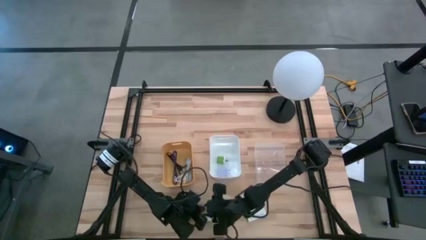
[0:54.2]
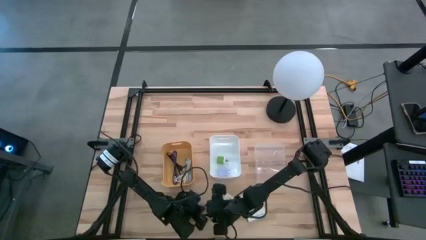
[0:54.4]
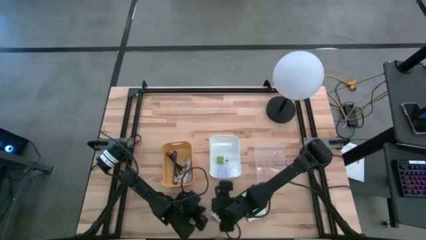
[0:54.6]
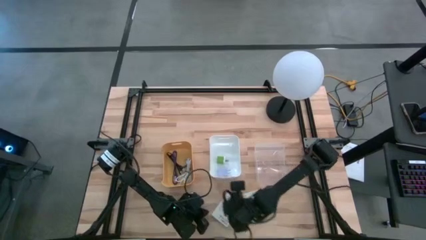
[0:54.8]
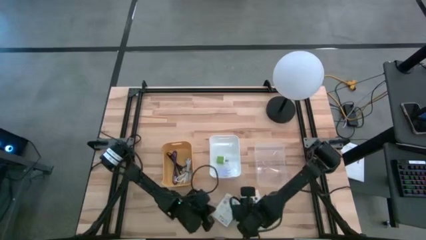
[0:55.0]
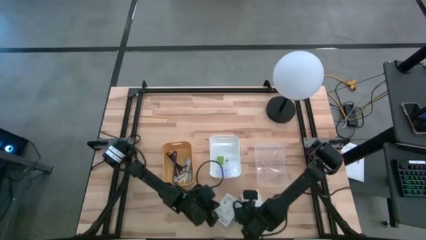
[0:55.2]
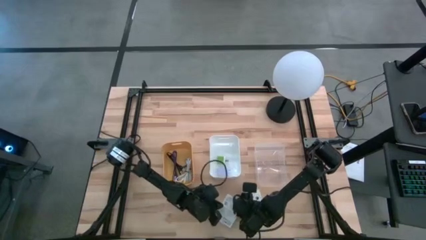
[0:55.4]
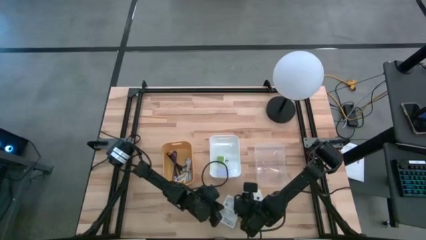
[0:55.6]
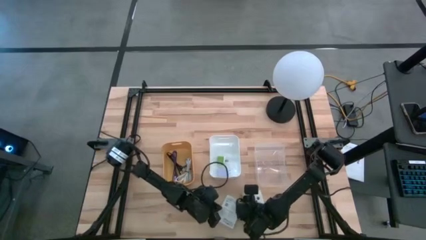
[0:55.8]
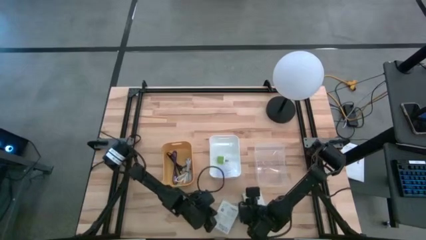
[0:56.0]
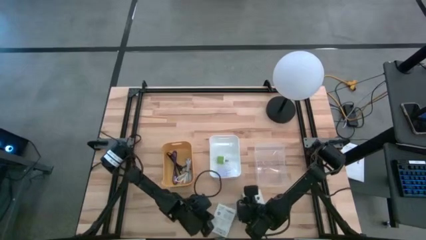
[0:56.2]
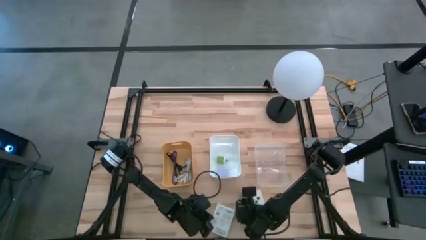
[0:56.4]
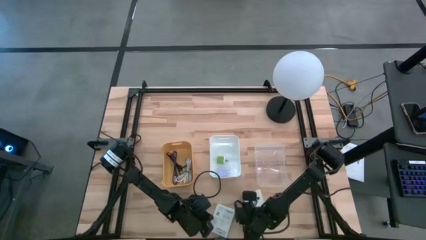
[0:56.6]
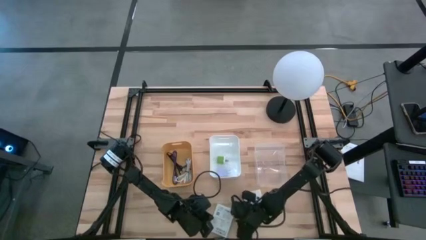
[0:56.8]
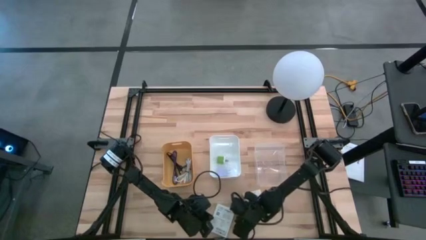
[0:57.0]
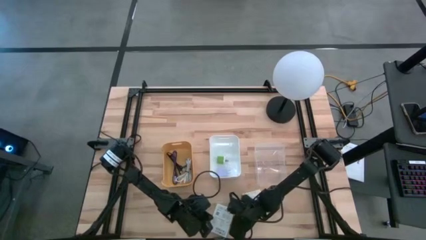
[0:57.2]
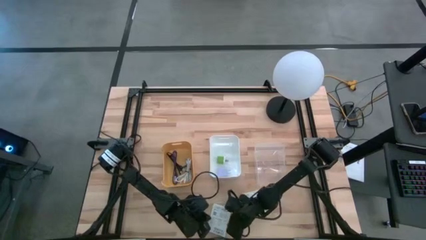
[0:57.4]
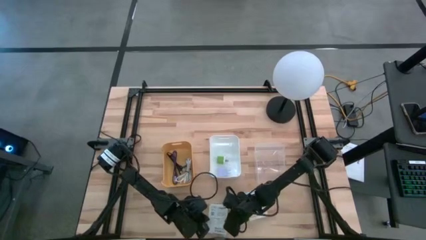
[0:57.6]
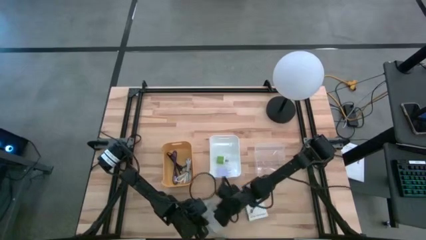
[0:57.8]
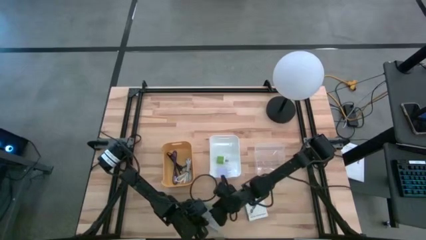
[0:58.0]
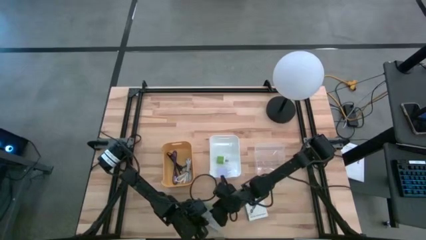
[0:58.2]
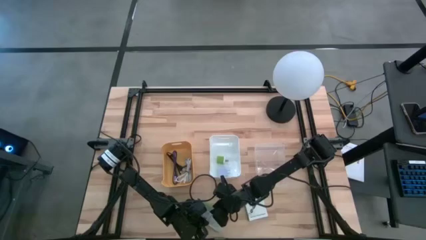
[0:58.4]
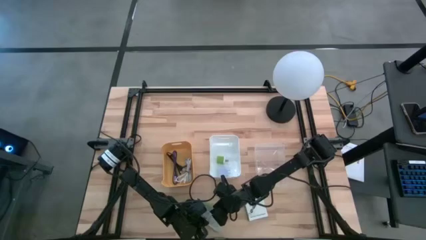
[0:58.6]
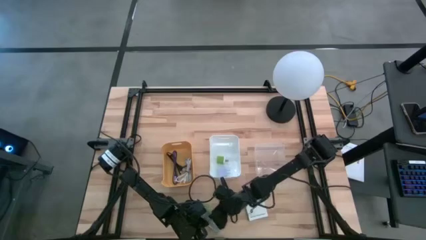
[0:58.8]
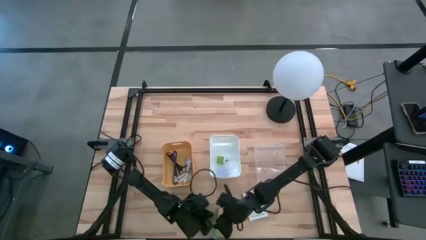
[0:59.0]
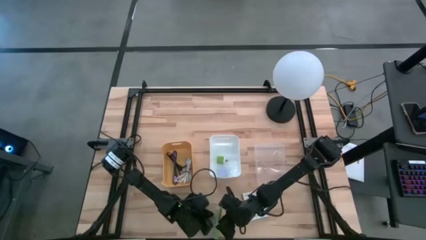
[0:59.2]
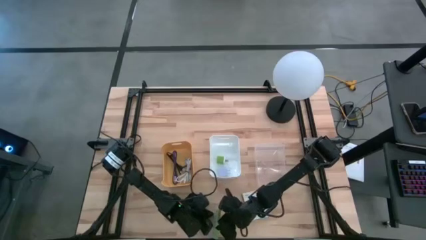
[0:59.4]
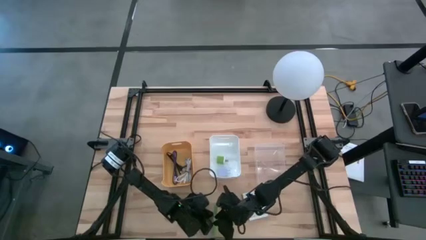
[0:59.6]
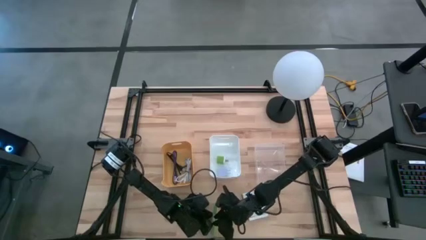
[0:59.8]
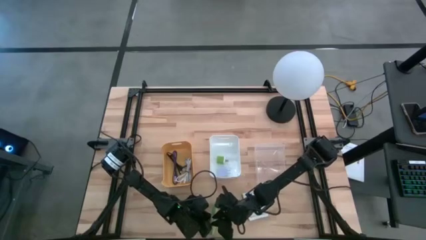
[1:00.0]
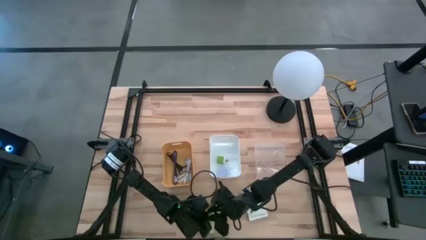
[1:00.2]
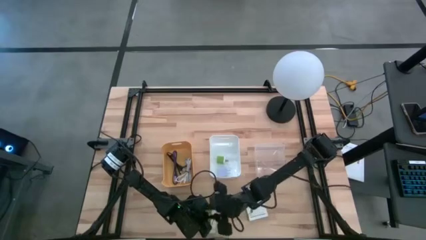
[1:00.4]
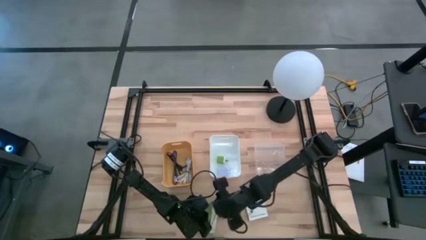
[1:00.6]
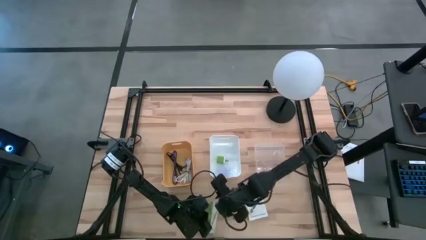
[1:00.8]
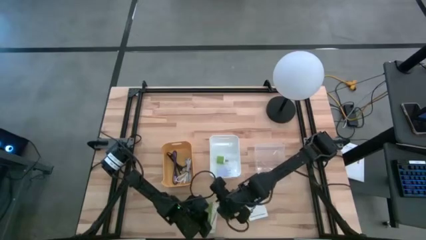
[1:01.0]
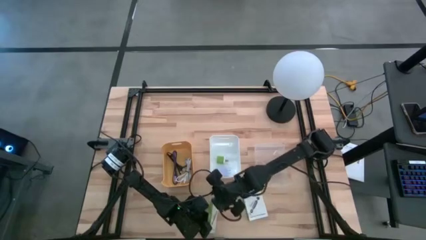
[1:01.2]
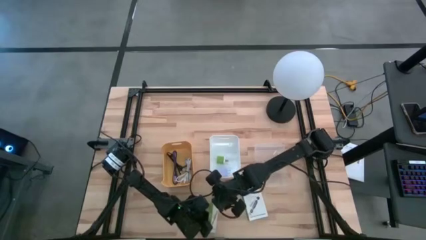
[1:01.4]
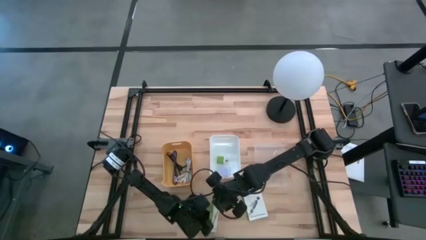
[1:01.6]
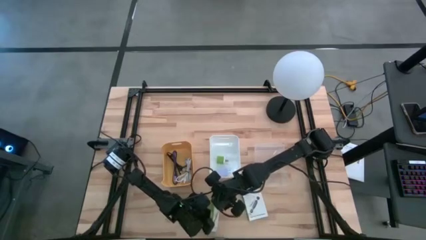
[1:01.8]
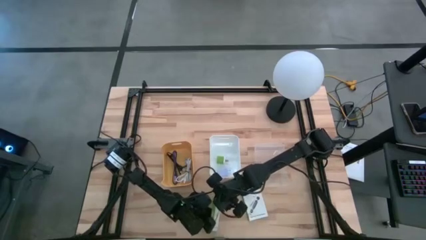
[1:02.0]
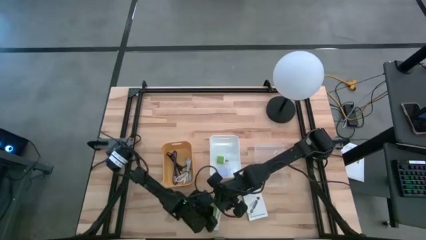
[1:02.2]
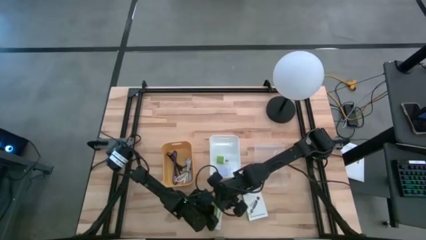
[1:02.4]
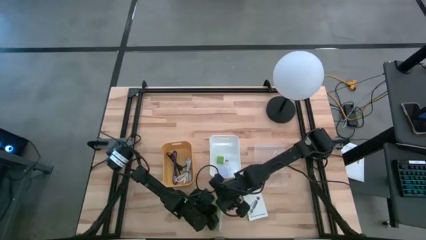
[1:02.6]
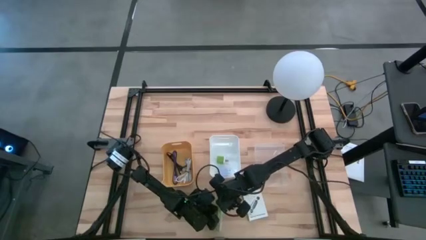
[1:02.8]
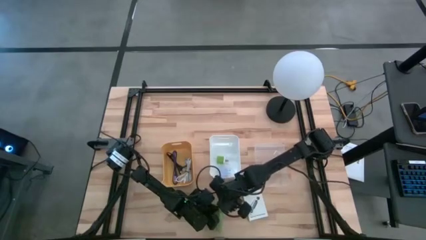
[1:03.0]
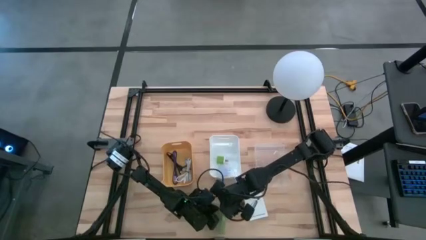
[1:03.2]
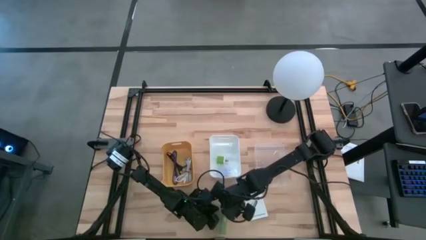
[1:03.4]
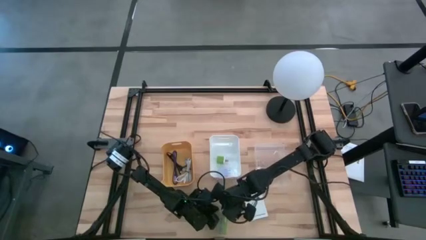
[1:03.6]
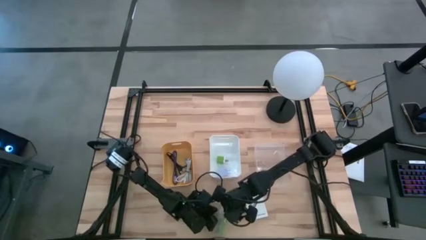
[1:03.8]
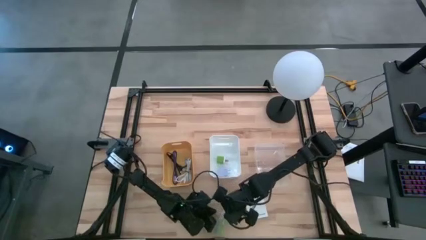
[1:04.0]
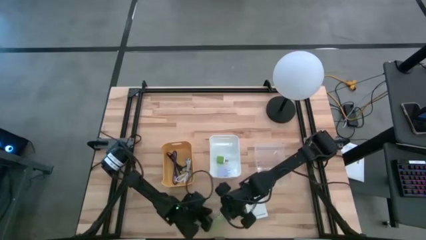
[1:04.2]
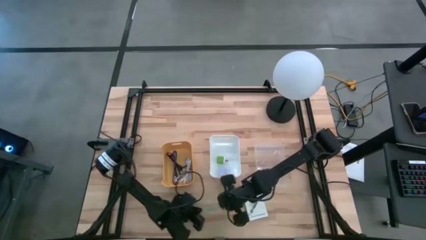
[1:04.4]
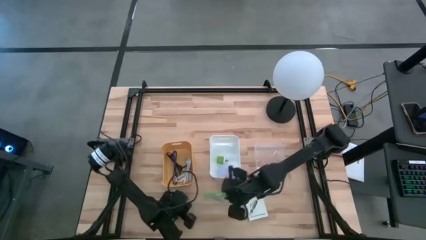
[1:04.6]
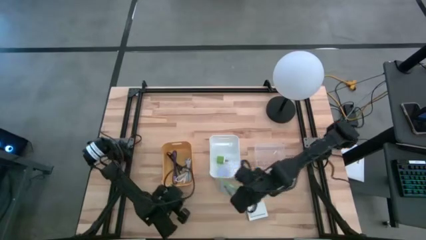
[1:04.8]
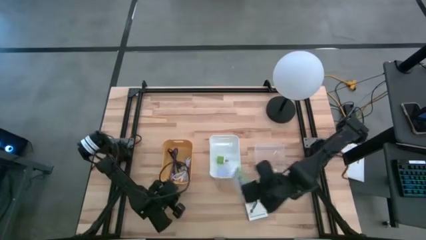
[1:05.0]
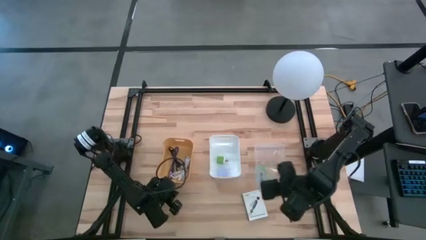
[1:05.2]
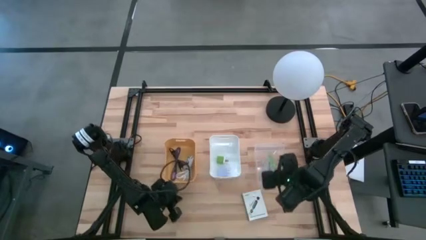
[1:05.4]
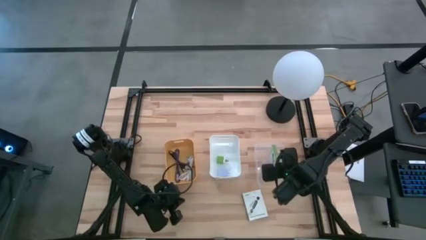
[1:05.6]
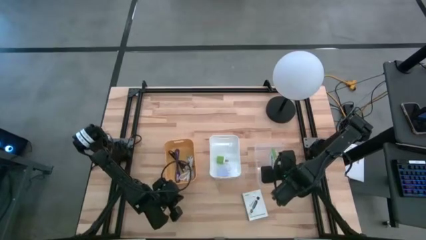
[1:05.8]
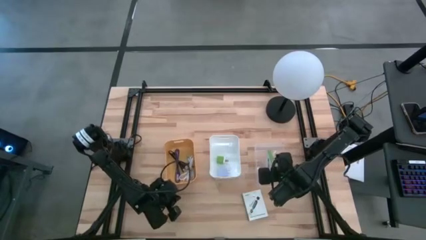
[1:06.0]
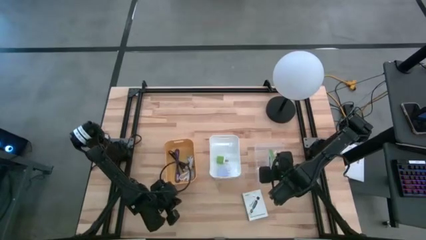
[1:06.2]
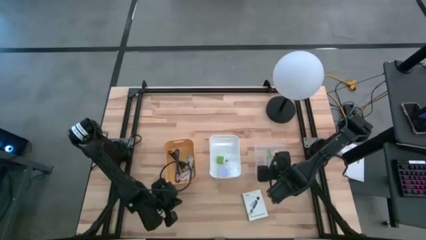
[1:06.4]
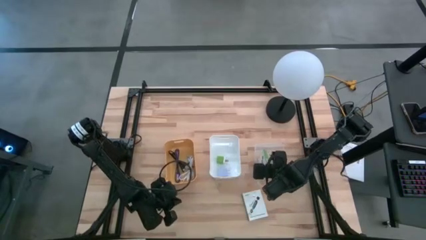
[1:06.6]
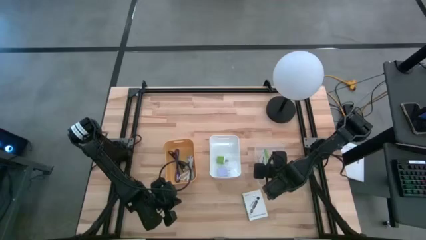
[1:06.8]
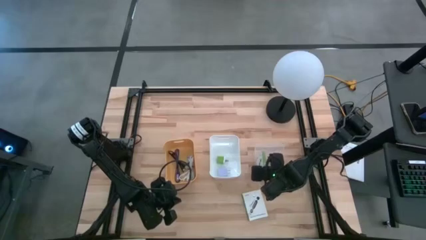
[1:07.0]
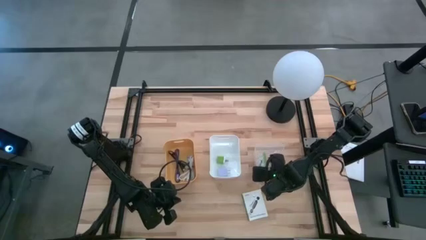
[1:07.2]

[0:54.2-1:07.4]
Task: Pick and place items into bin
Put the left white card reader box into the transparent bin

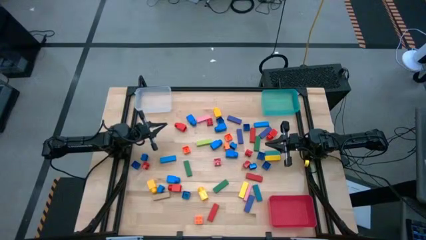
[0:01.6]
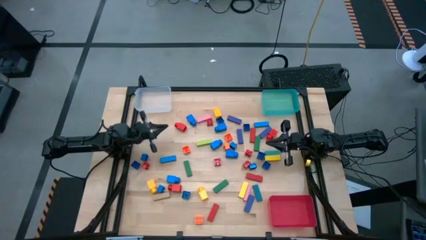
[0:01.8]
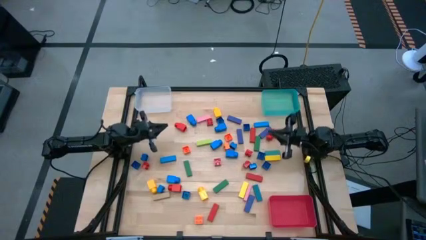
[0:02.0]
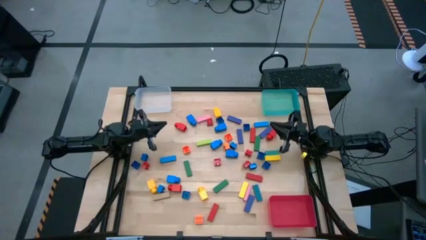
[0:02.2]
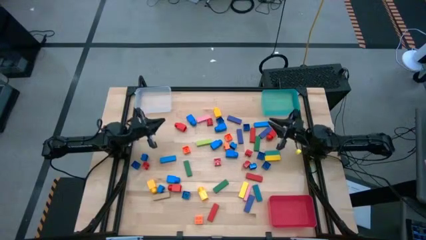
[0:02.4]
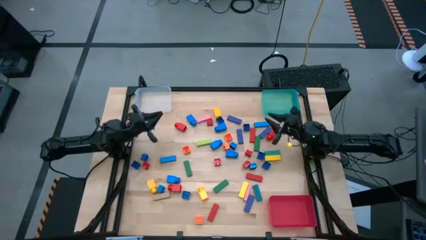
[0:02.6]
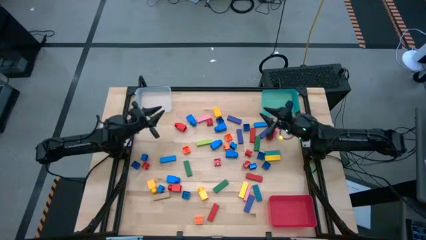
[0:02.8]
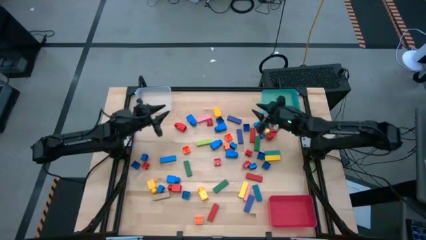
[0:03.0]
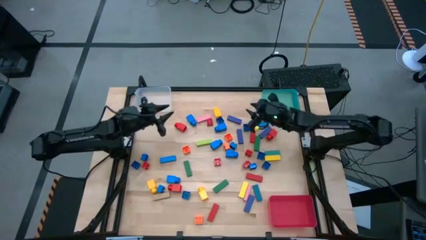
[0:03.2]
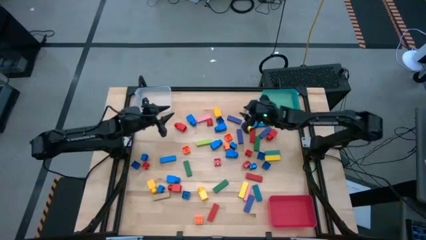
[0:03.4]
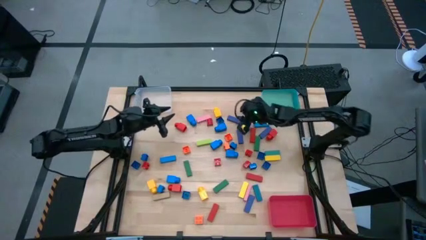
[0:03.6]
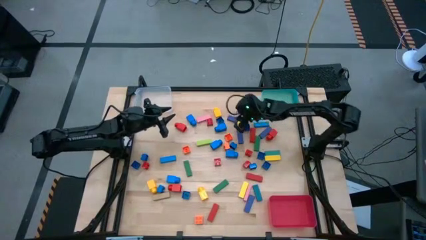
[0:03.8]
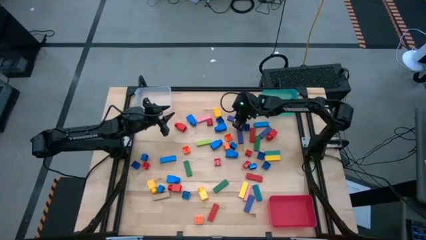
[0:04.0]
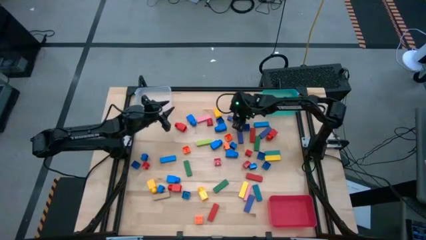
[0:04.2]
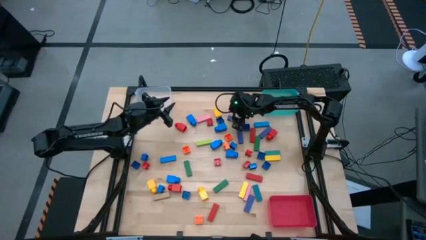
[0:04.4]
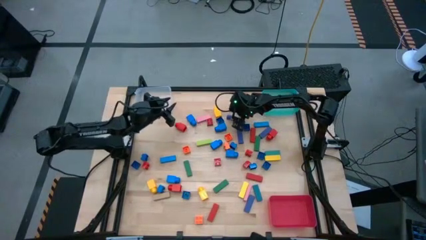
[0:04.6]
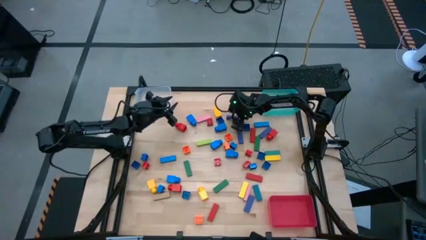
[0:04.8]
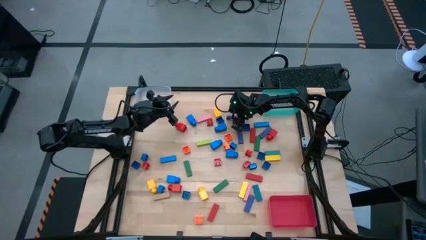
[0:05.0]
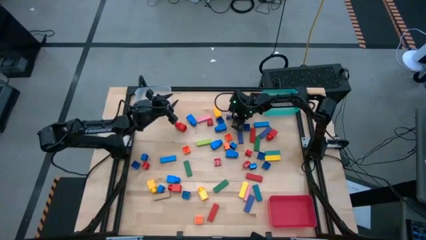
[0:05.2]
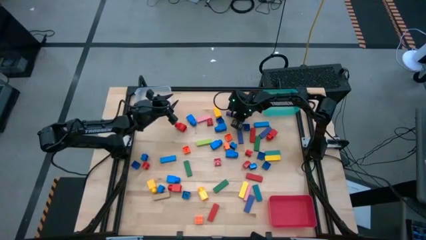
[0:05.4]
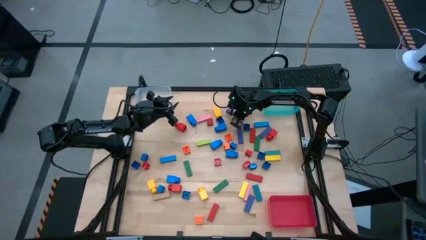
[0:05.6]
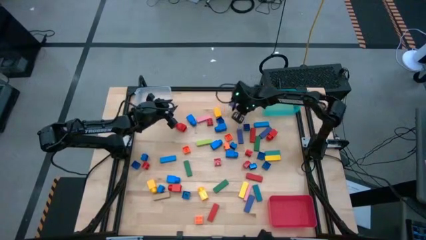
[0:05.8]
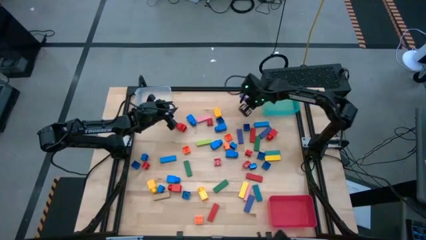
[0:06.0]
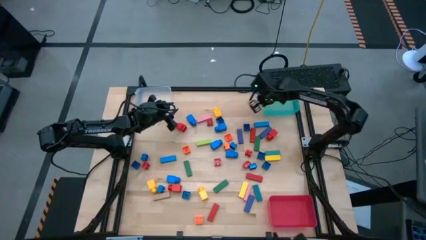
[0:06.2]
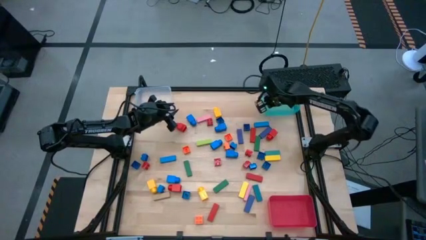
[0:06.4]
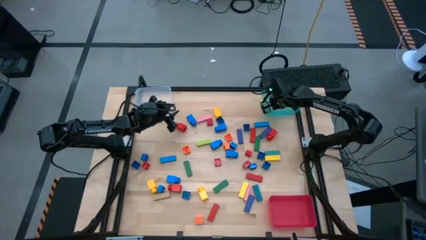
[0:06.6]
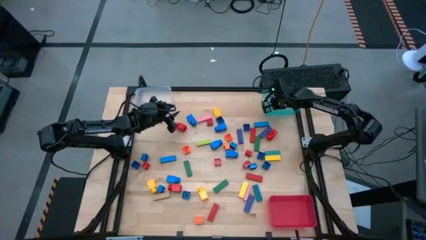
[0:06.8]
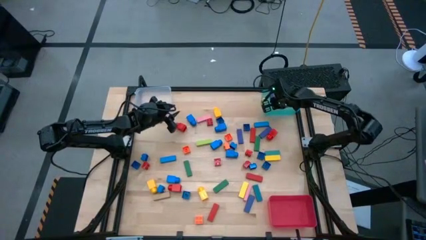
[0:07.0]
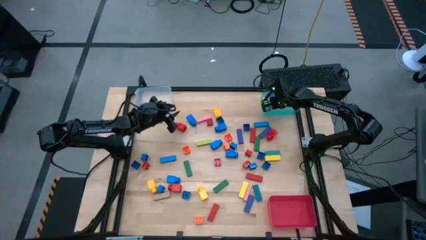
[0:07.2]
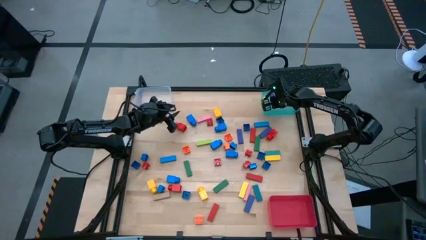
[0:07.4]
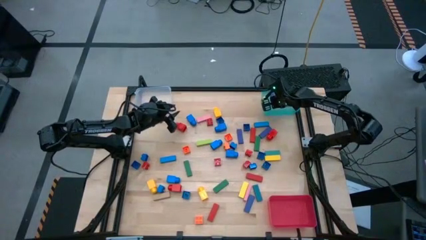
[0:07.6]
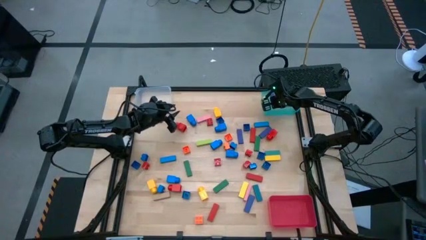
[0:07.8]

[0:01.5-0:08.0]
Task: Sort blocks by size
Put the blue block into the blue bin
